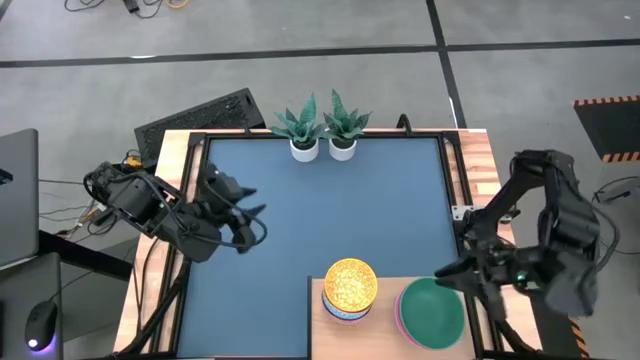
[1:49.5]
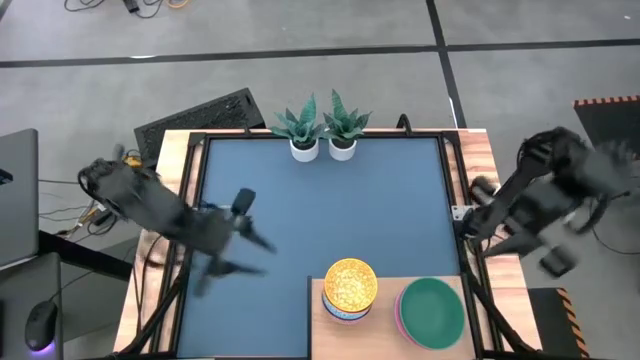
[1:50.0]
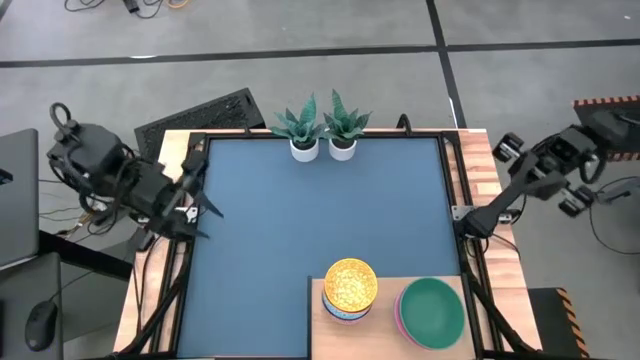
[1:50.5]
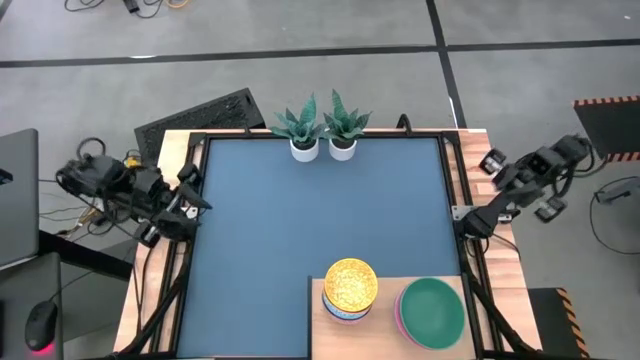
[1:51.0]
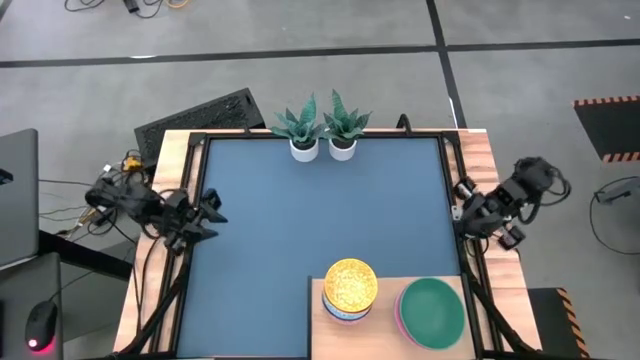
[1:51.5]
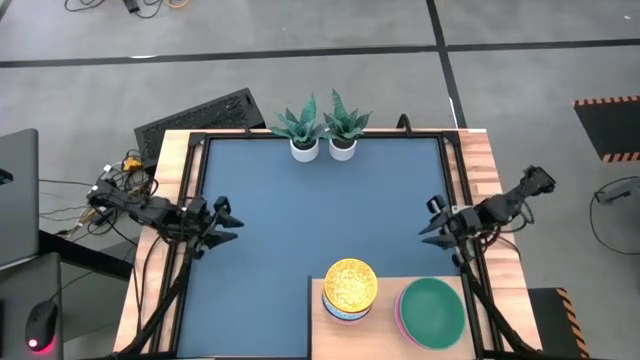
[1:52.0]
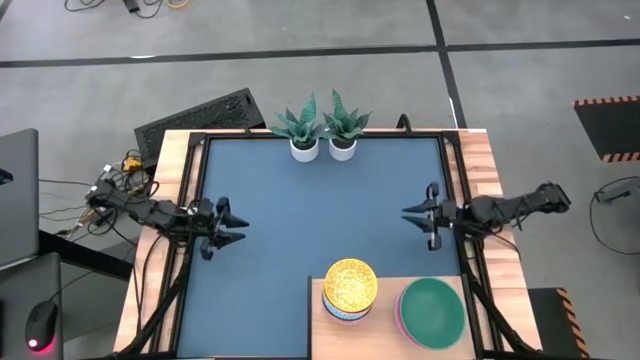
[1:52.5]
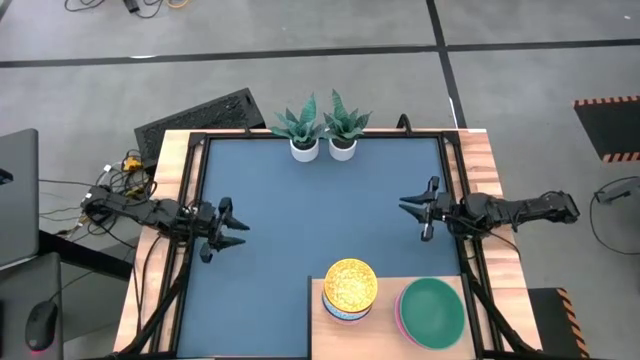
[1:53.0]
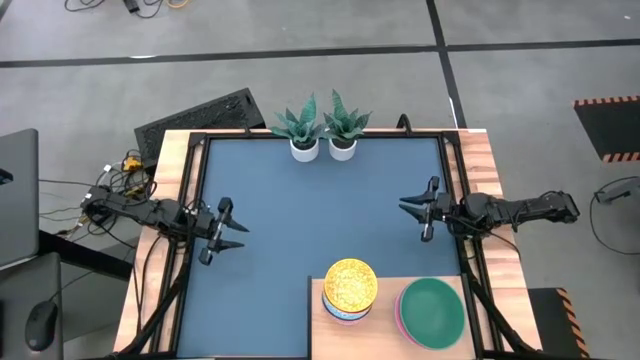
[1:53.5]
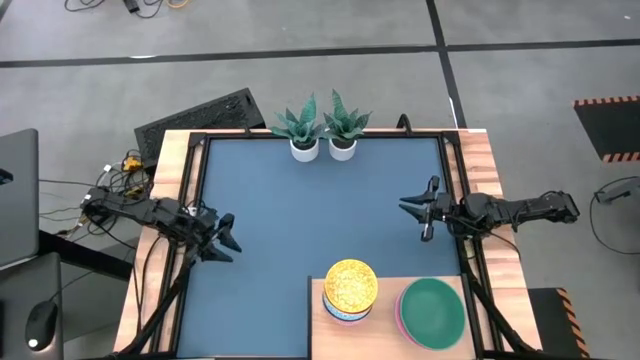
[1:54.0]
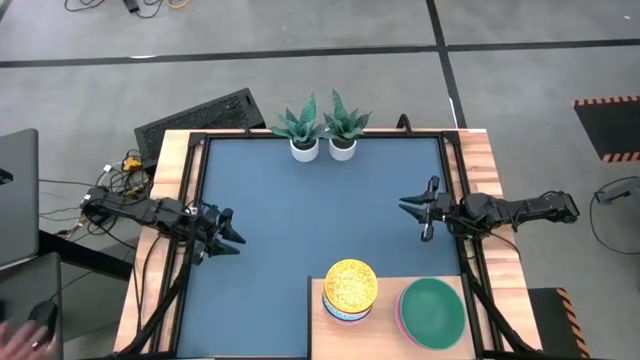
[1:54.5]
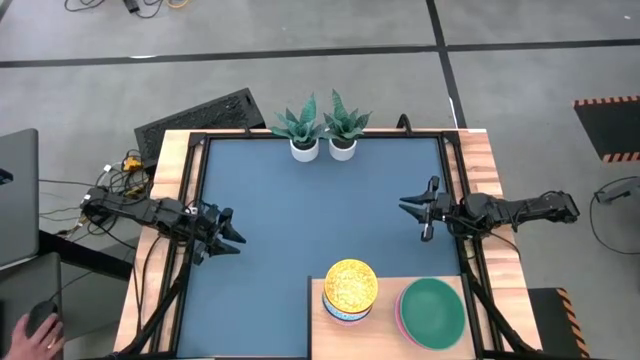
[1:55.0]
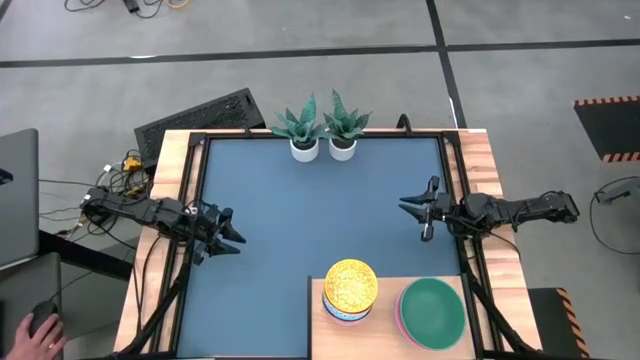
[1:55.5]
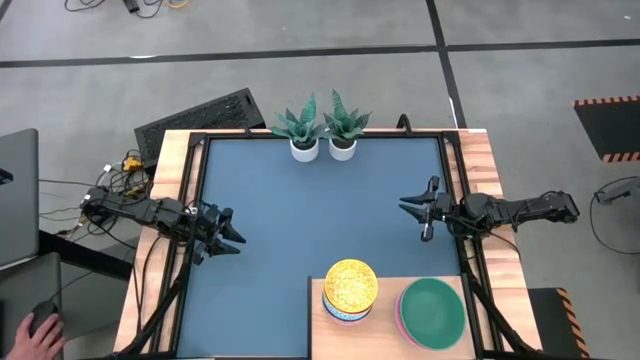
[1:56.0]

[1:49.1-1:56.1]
Task: Place and stack bowls onto a shelf
Return to Home Position

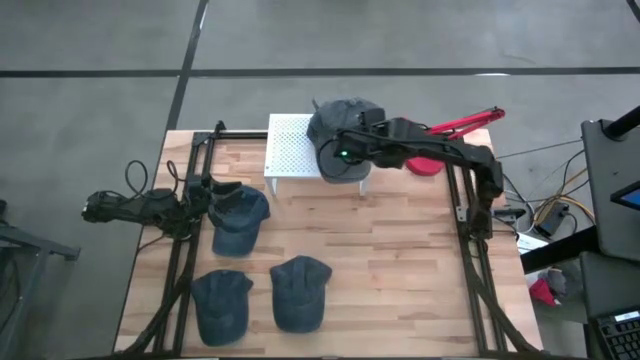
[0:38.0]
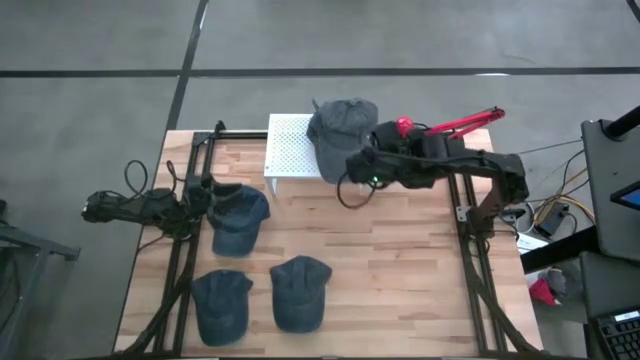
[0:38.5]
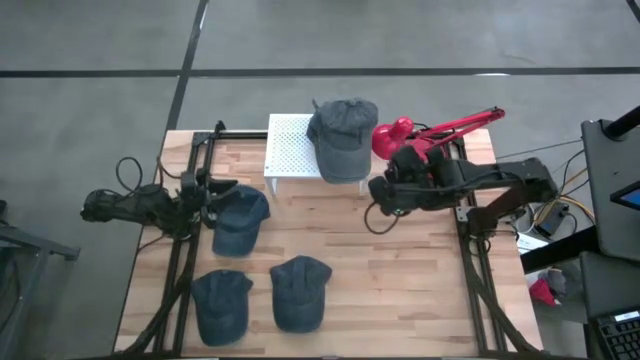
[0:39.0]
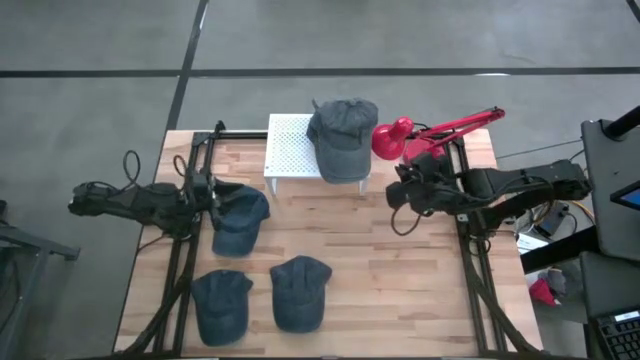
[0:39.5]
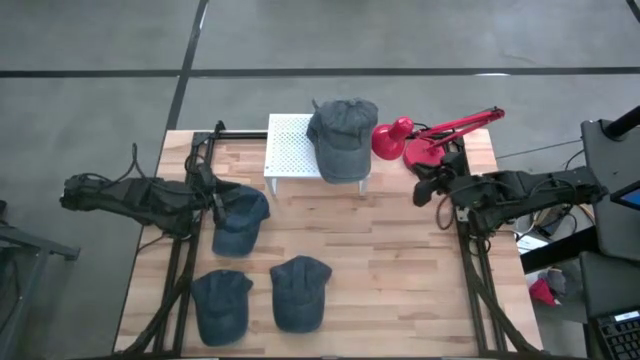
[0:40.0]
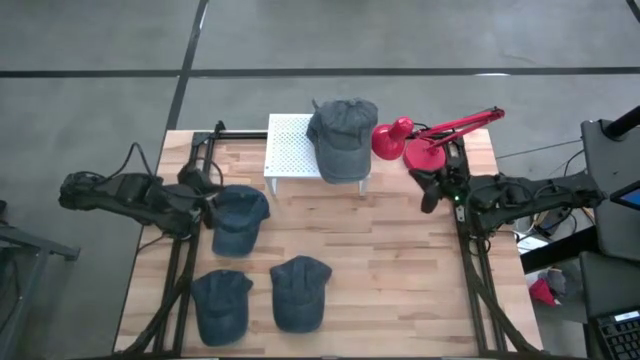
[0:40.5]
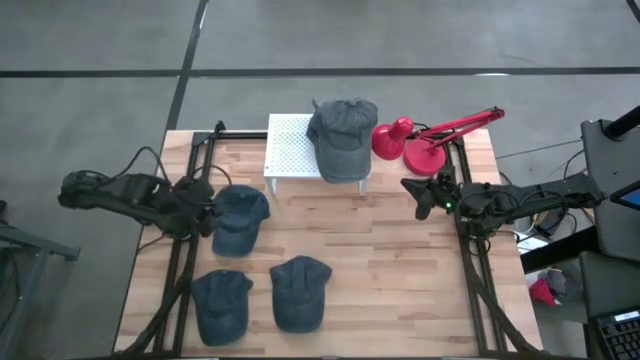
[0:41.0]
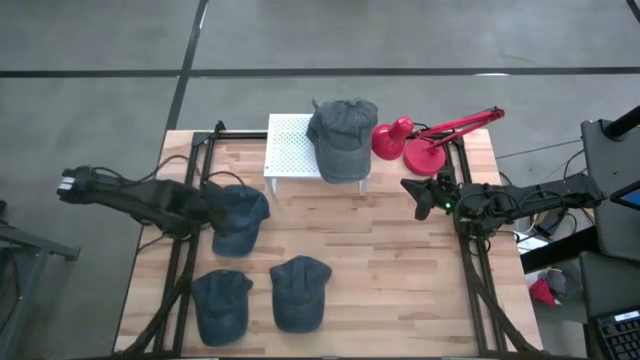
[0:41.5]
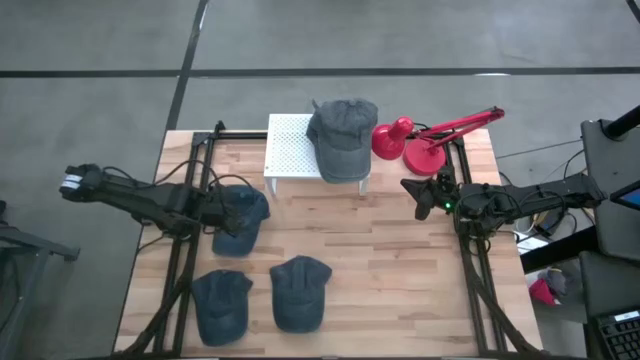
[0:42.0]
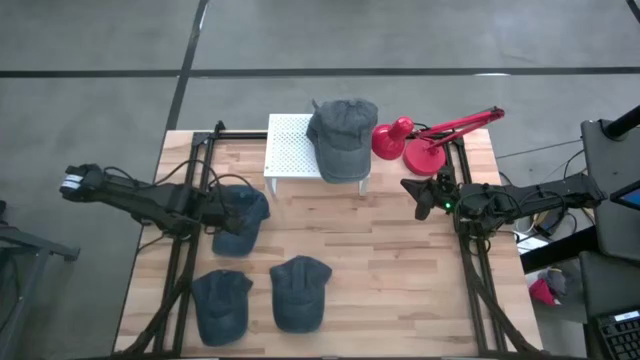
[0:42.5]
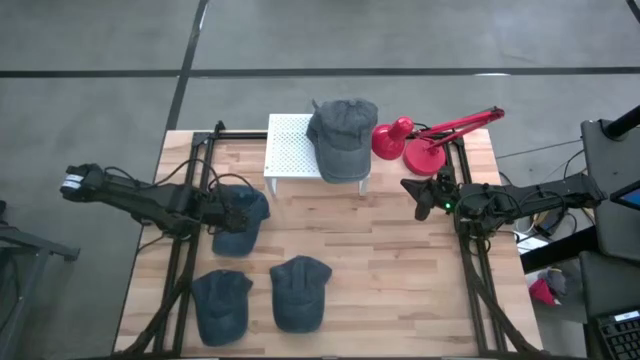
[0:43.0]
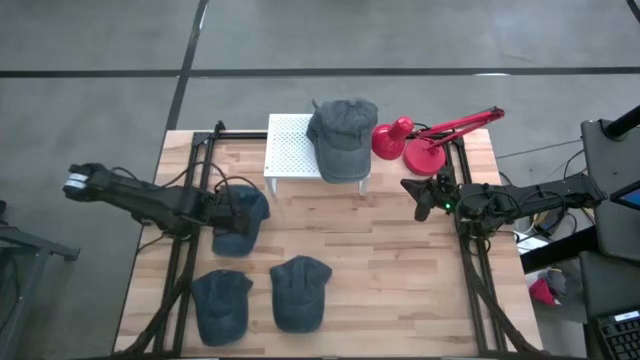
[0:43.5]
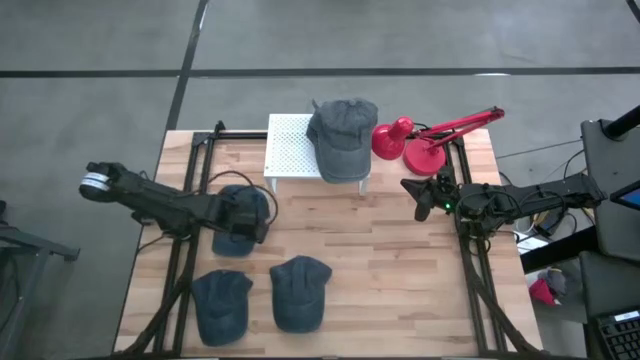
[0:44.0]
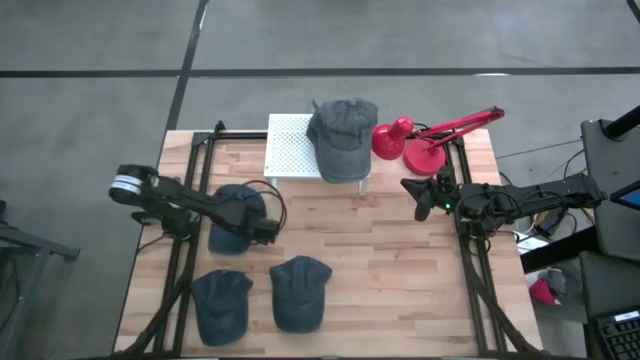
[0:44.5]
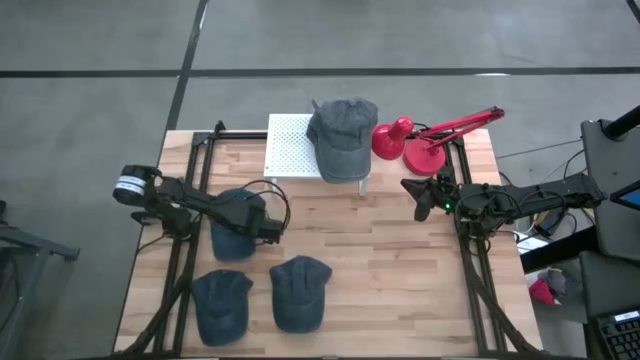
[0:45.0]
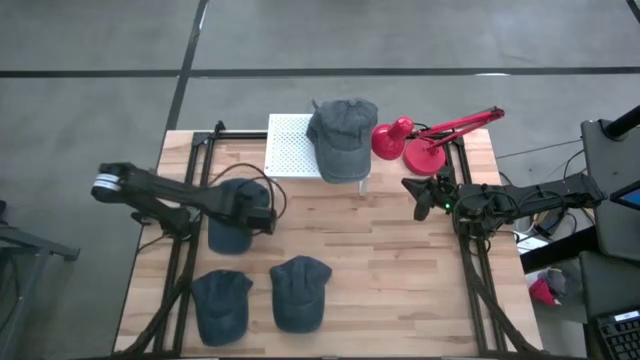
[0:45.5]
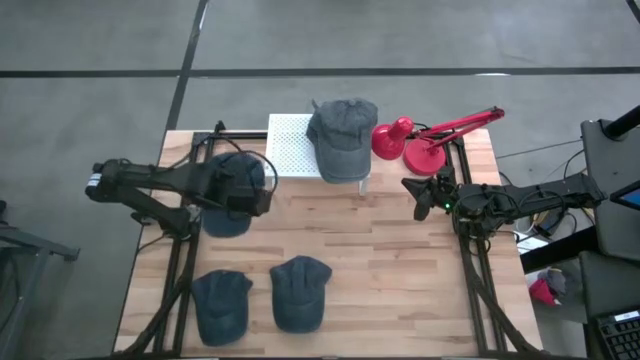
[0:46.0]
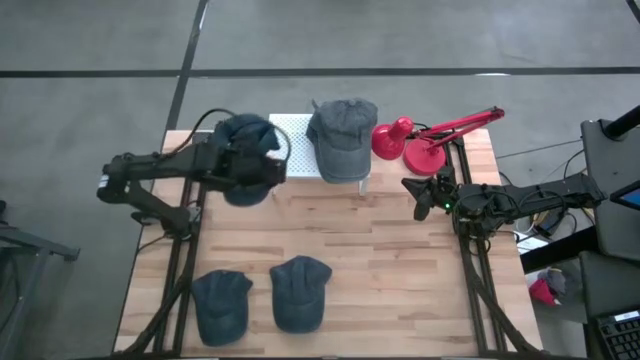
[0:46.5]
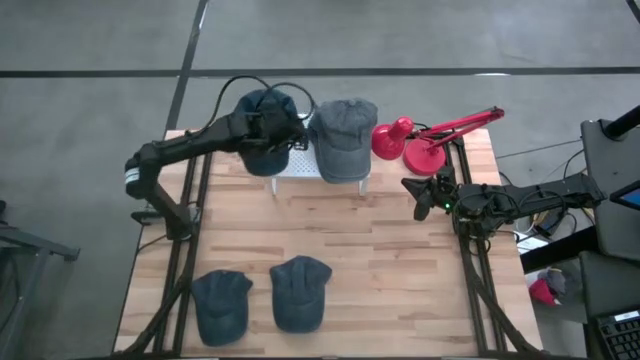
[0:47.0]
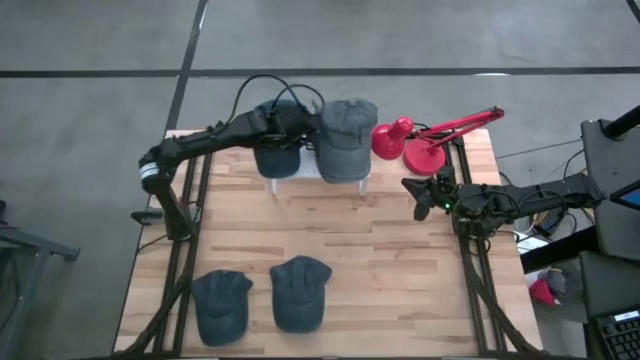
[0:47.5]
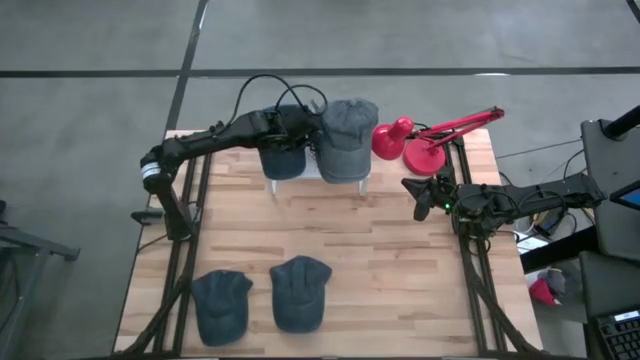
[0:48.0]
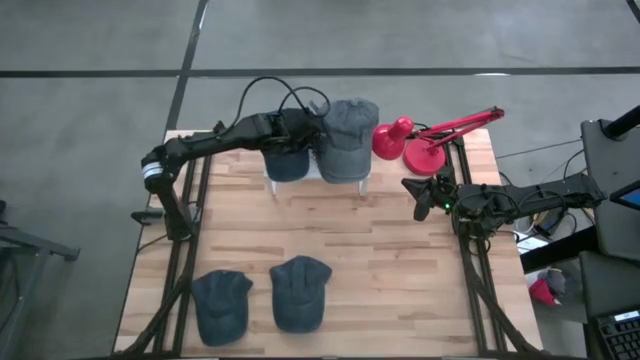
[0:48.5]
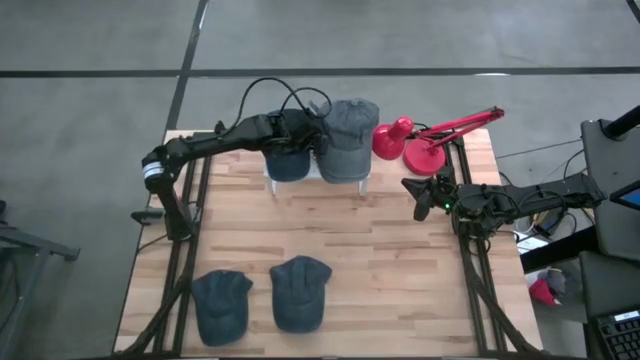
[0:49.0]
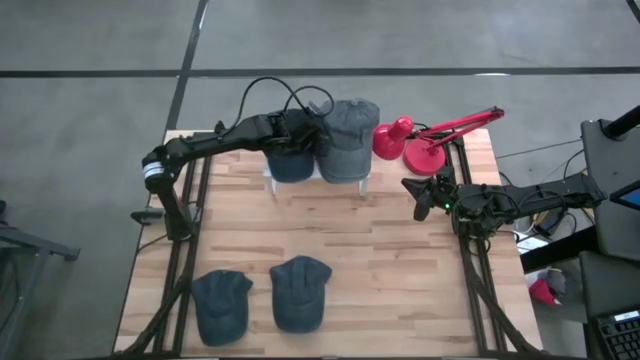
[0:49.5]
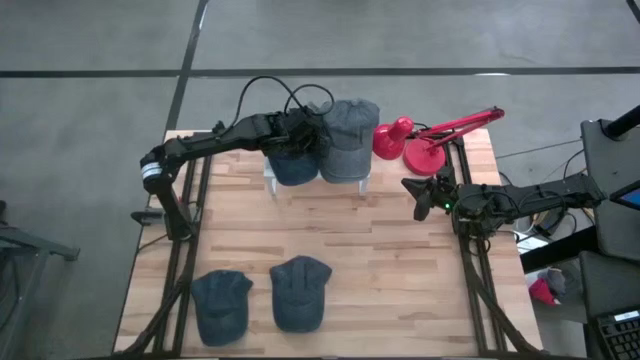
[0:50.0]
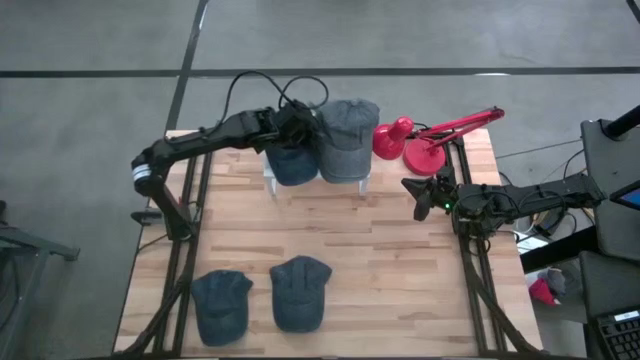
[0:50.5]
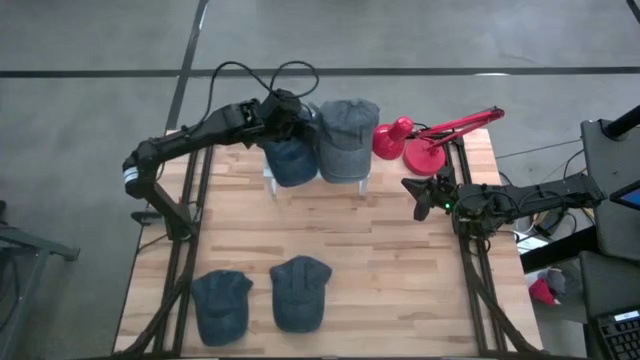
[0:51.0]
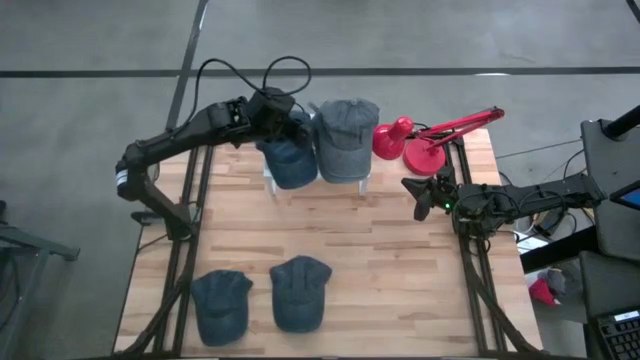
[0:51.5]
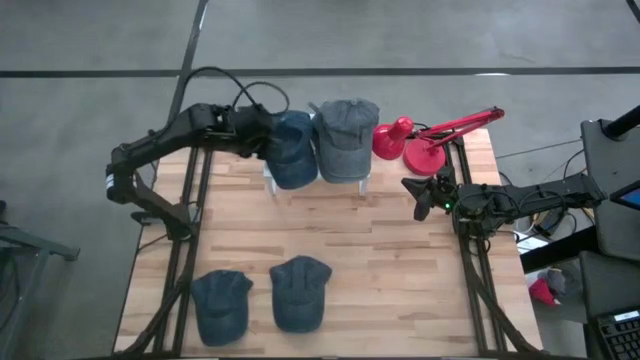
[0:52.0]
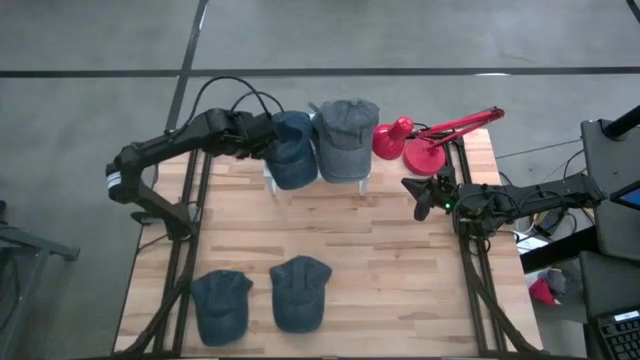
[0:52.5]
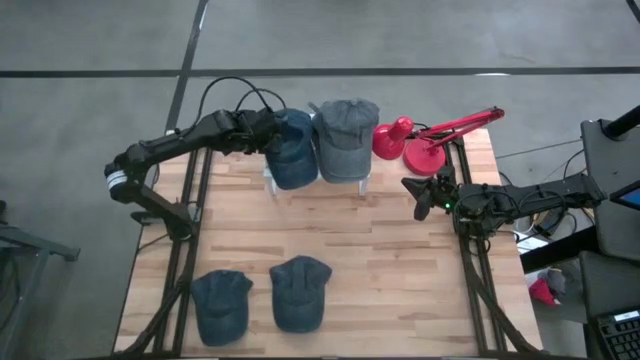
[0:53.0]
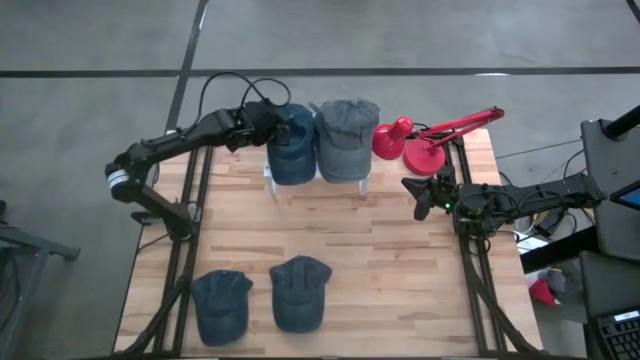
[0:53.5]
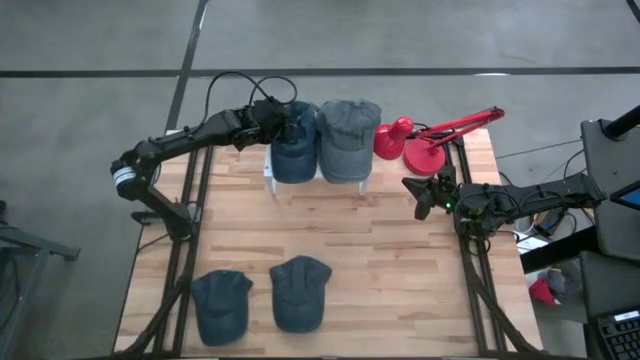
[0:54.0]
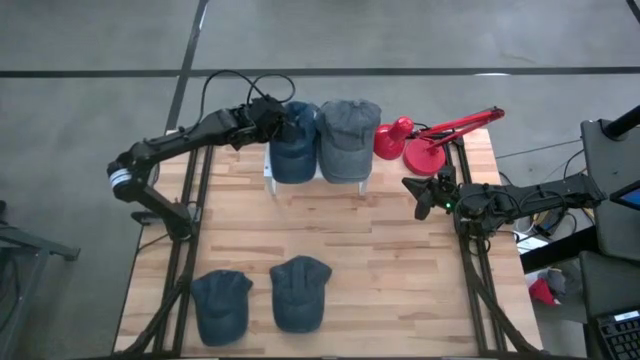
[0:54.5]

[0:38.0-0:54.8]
Task: Stack small to large cups/mugs on shelf
Put the top blue cup on the shelf
